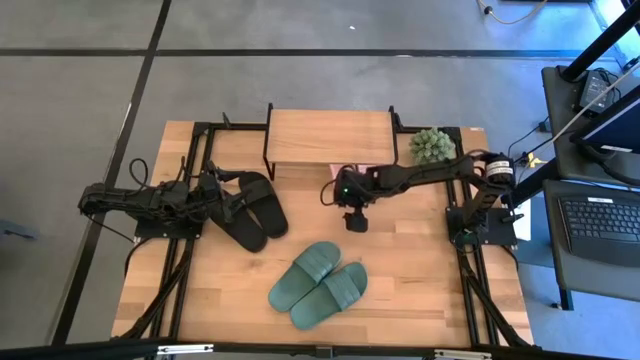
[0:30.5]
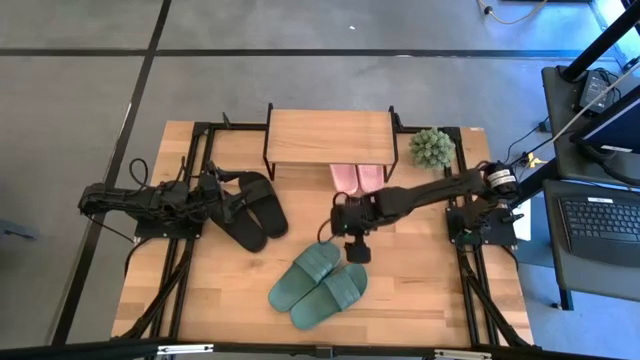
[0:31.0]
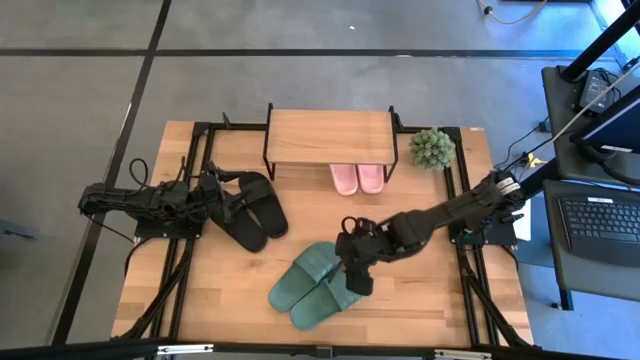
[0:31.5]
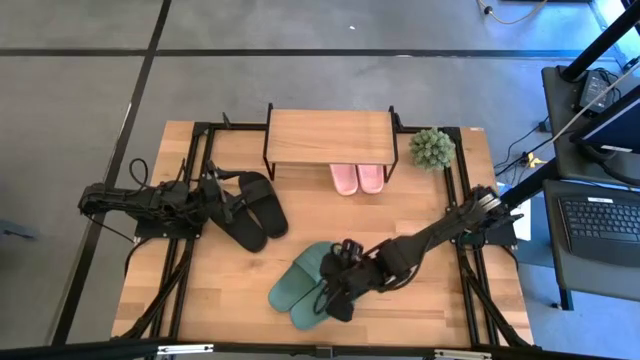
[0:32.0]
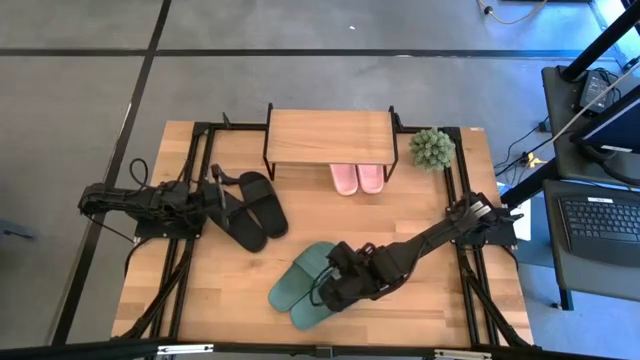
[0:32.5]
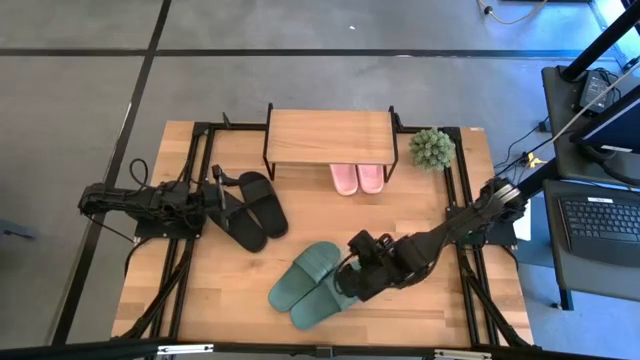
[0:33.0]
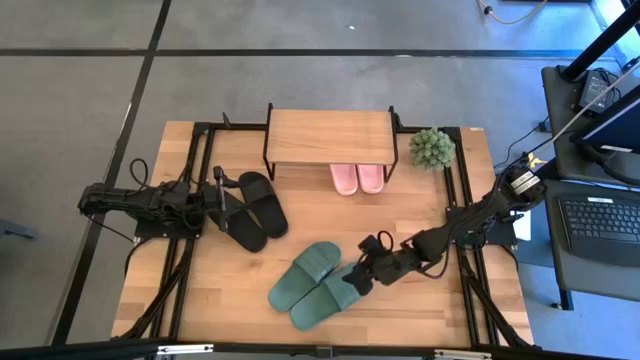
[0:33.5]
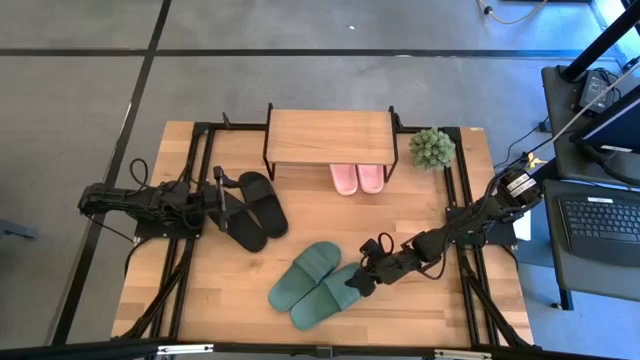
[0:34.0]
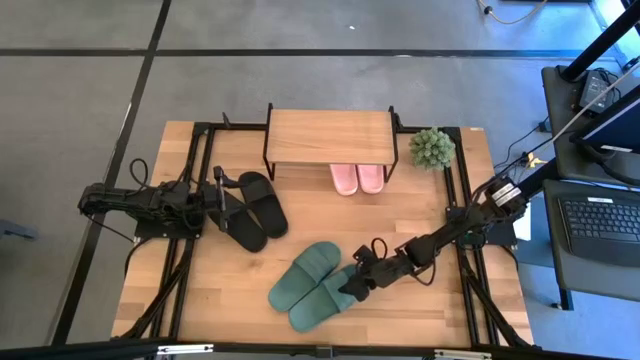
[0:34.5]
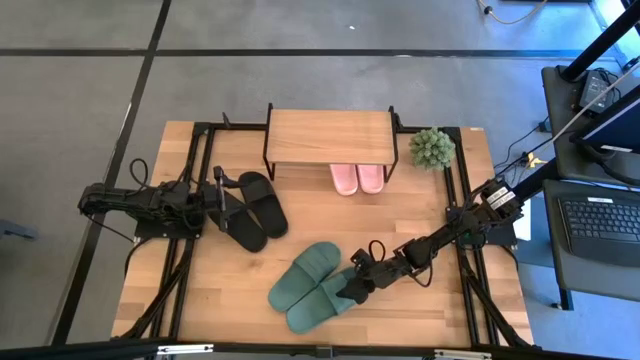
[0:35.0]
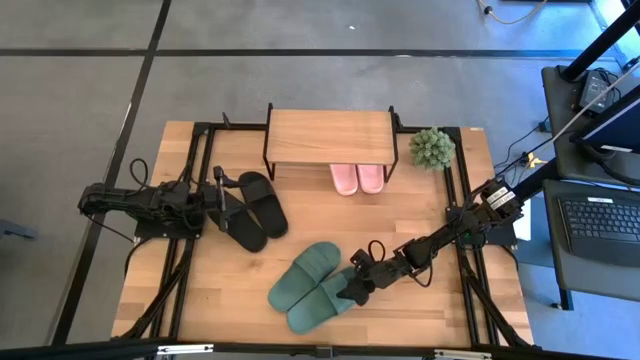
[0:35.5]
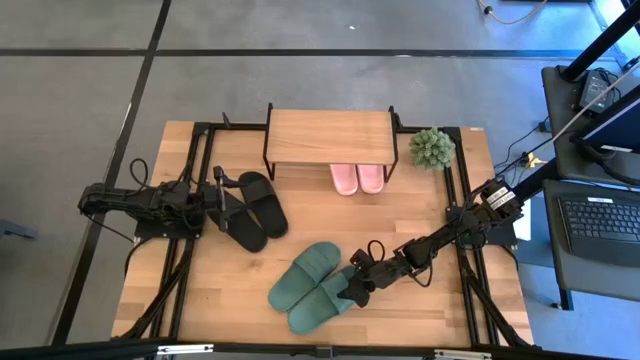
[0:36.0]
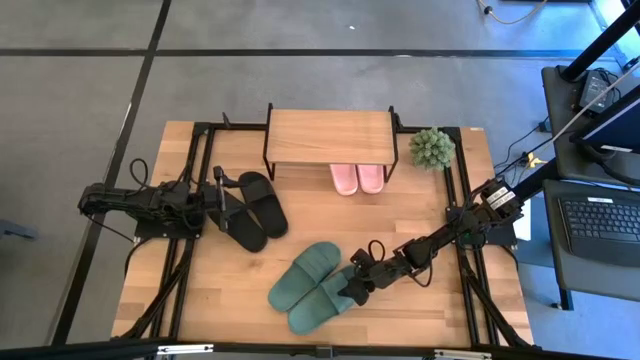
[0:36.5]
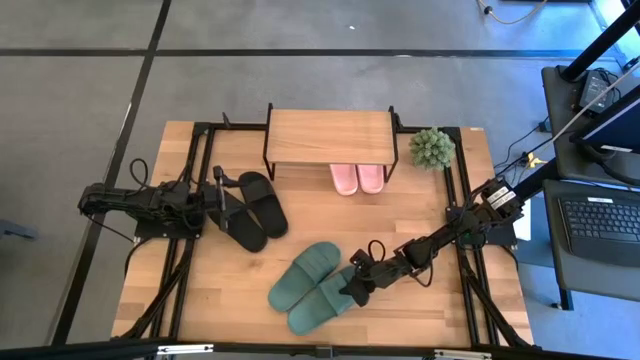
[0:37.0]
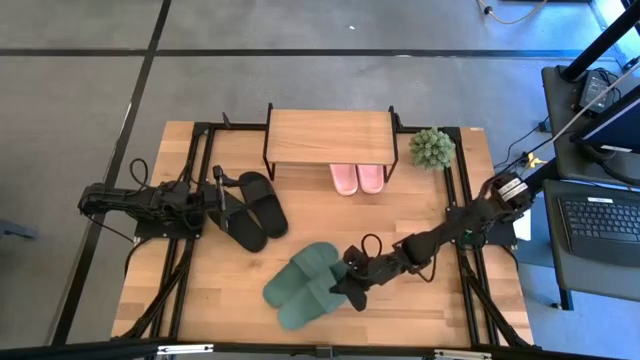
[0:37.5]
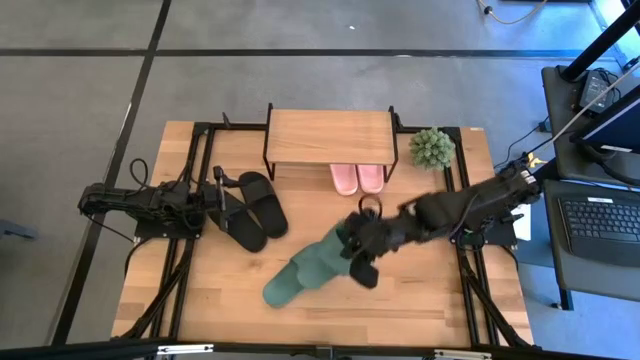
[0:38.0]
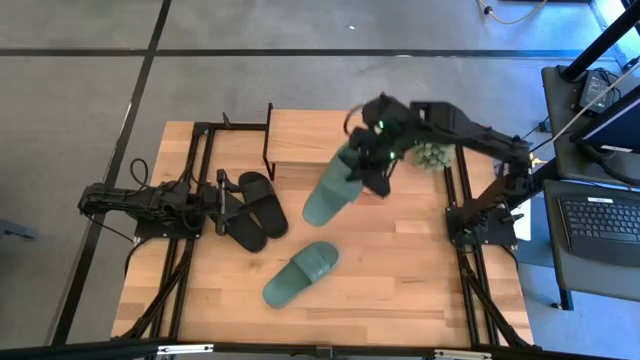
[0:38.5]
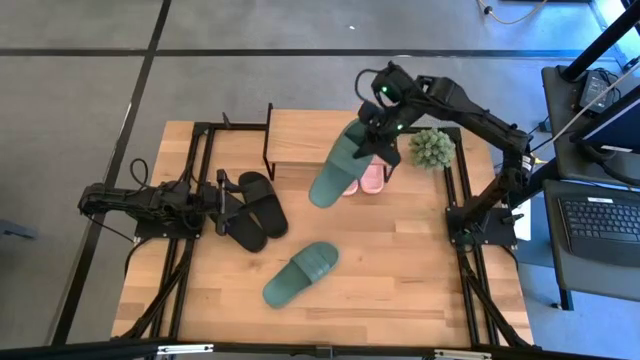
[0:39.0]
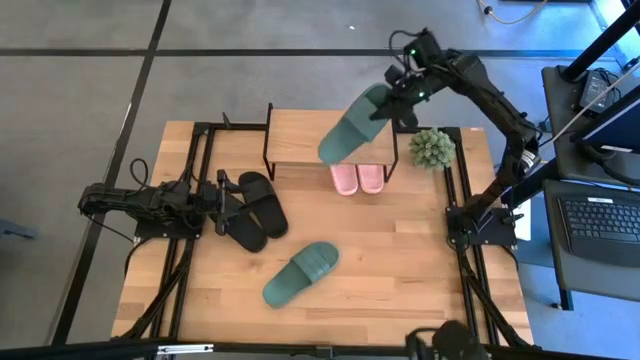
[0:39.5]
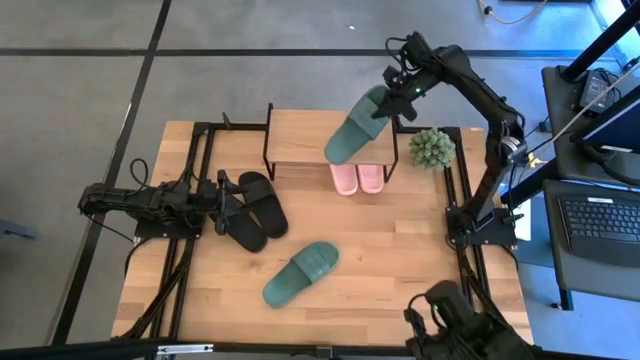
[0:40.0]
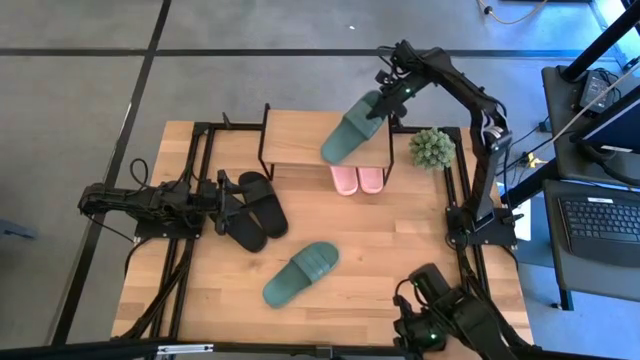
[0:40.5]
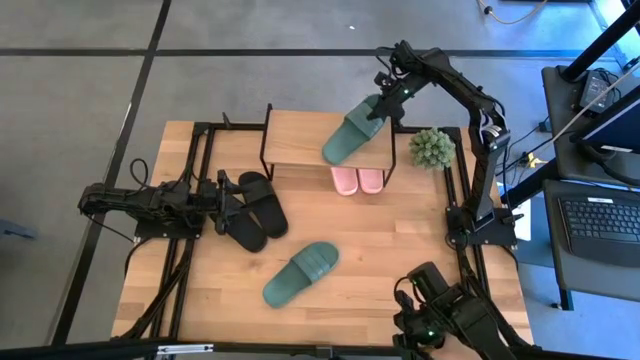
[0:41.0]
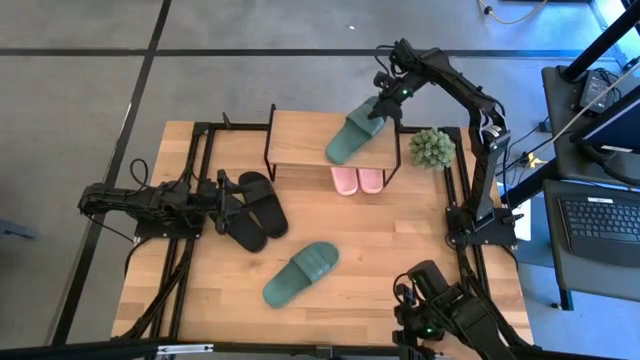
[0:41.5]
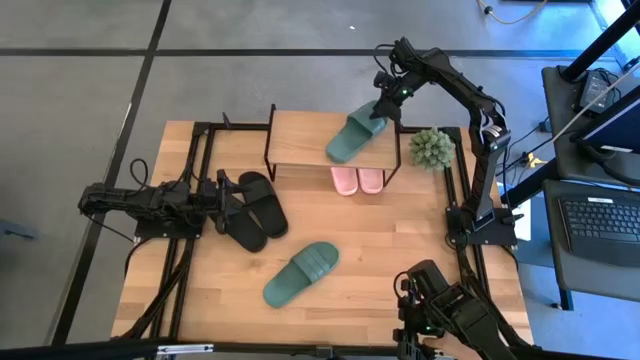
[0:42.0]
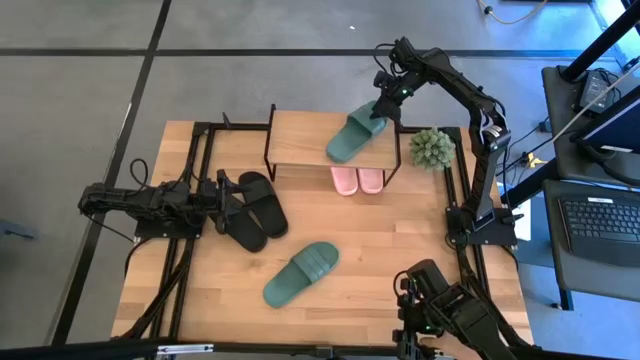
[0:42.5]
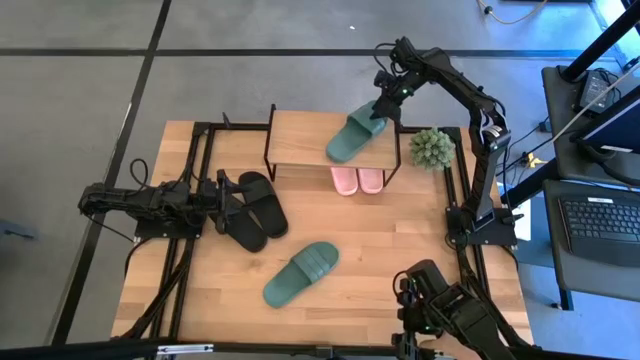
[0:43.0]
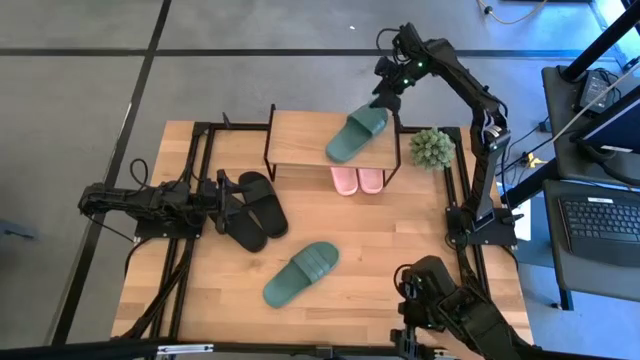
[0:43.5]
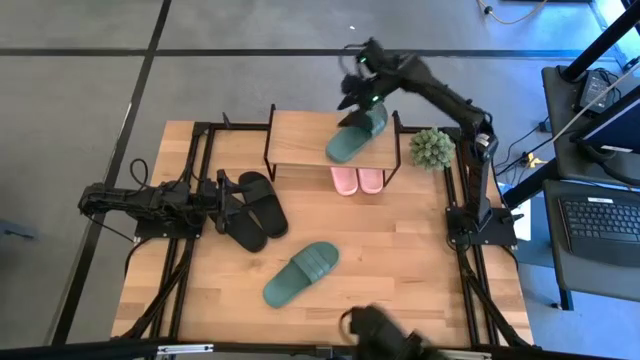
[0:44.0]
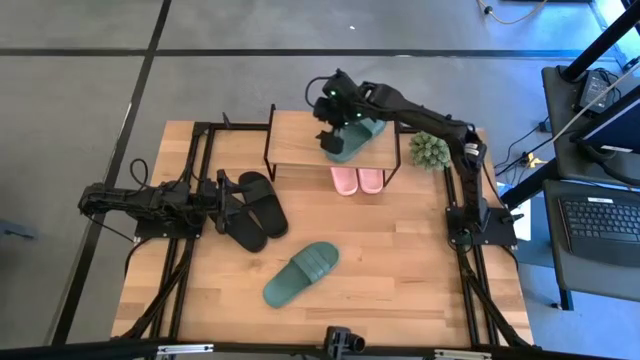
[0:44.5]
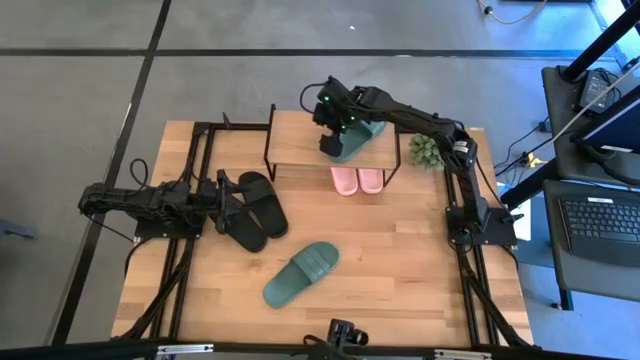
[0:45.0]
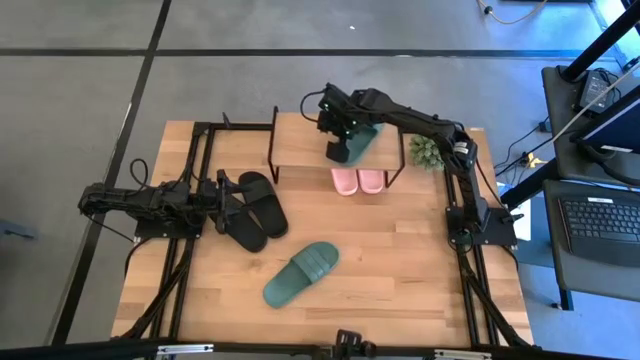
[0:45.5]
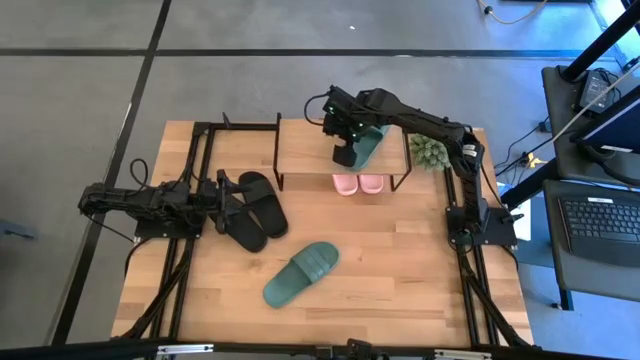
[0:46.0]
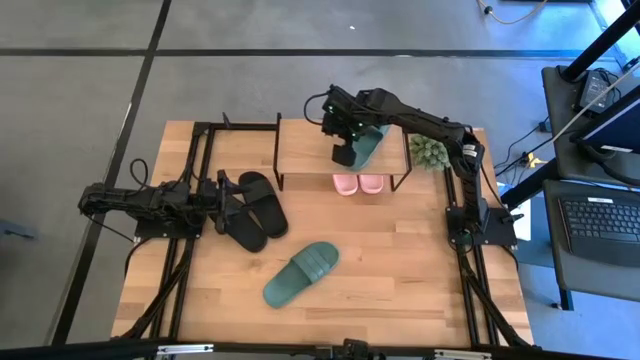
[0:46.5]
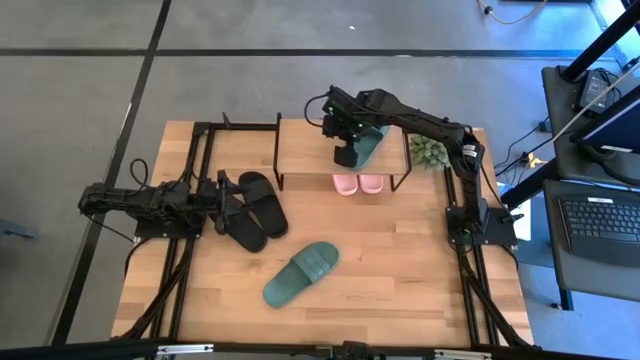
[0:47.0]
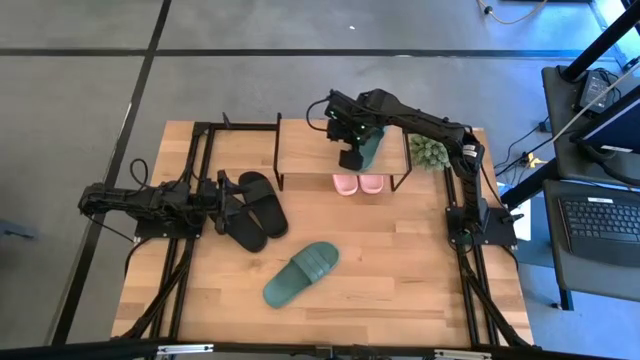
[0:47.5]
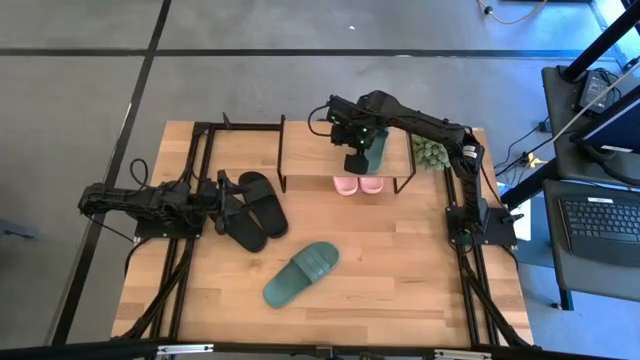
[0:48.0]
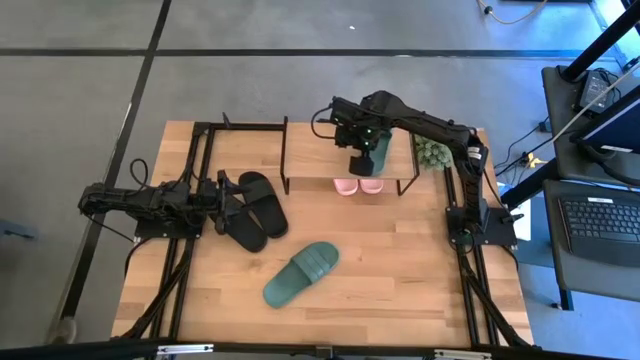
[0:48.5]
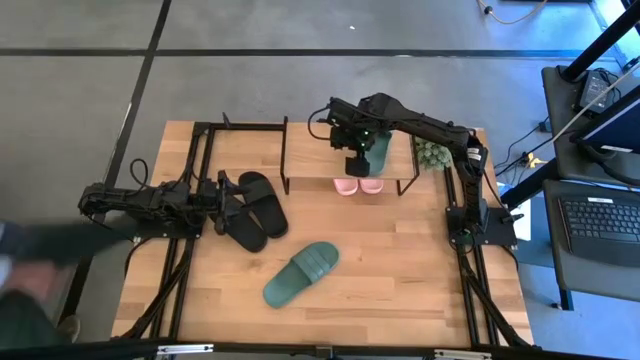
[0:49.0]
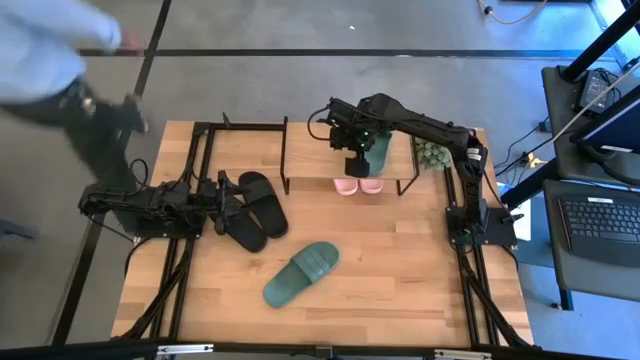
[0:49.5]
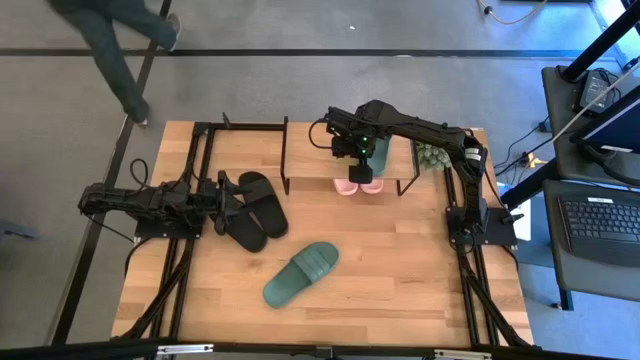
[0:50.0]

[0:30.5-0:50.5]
Task: Pick and place slides into the shelf
Put the right green slide on the shelf
